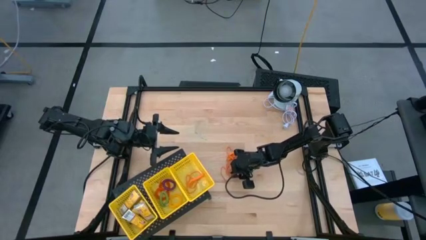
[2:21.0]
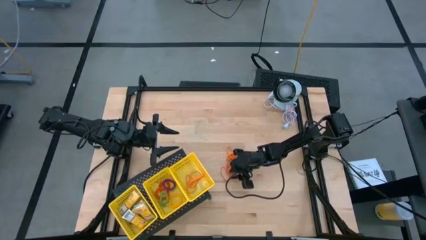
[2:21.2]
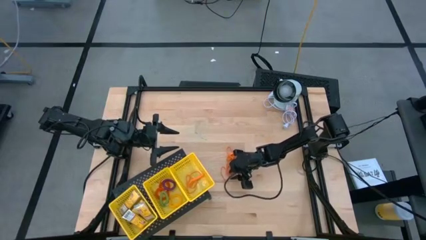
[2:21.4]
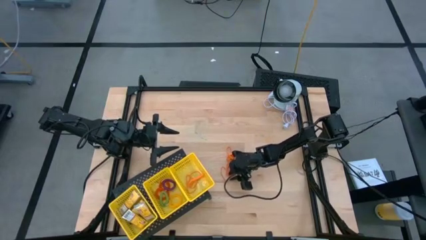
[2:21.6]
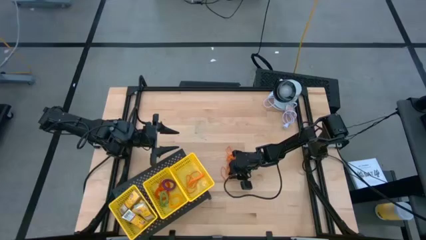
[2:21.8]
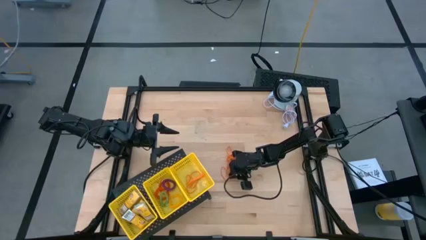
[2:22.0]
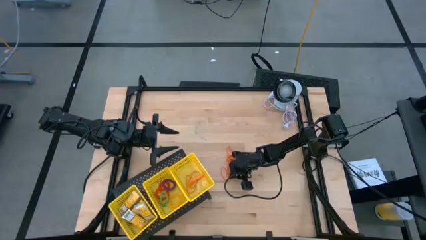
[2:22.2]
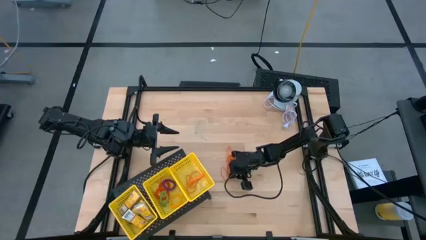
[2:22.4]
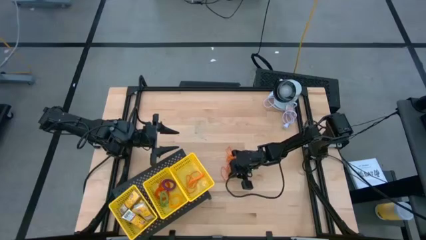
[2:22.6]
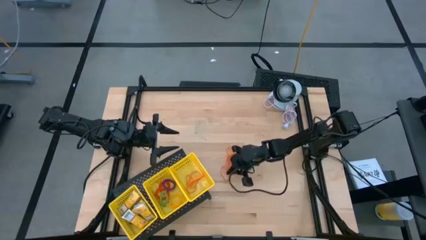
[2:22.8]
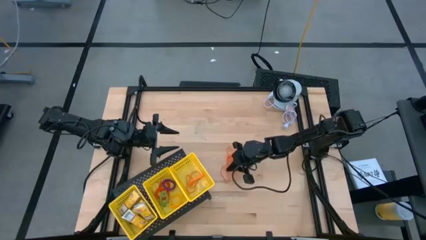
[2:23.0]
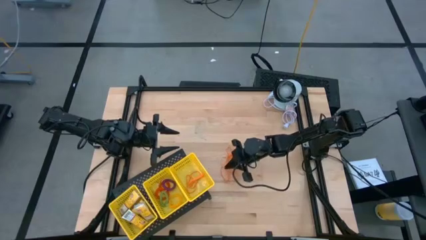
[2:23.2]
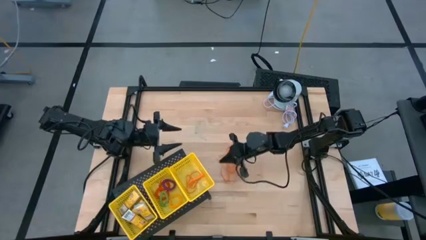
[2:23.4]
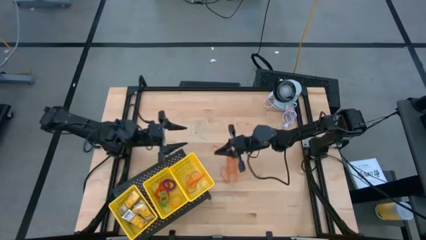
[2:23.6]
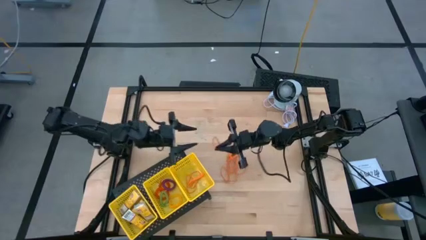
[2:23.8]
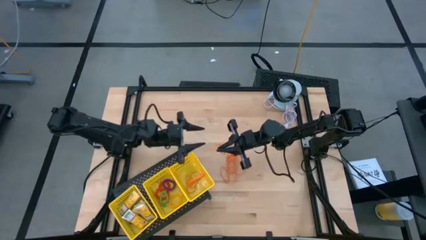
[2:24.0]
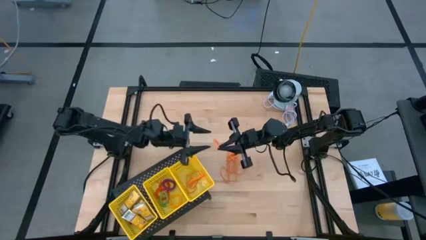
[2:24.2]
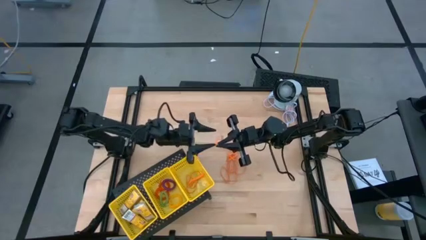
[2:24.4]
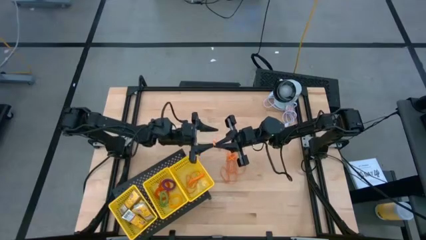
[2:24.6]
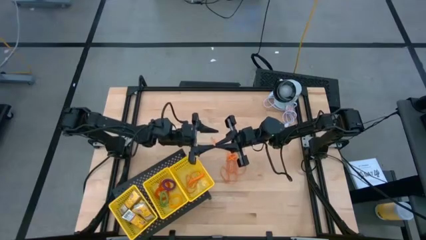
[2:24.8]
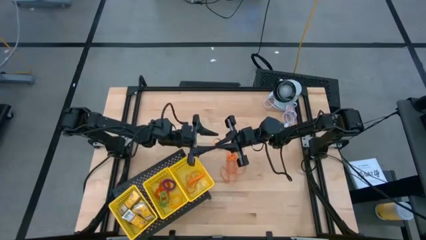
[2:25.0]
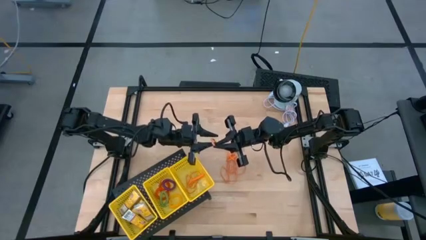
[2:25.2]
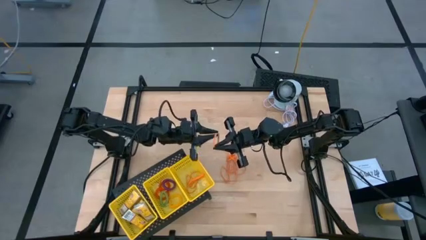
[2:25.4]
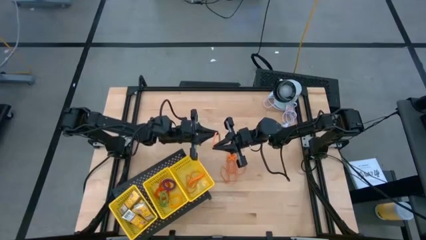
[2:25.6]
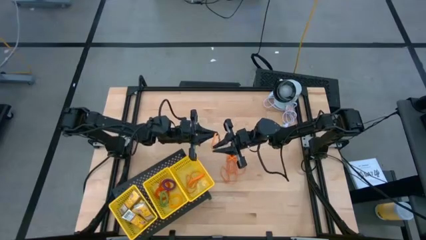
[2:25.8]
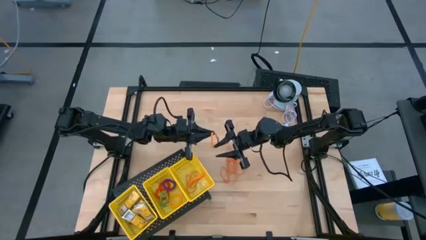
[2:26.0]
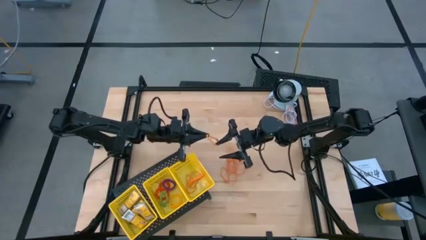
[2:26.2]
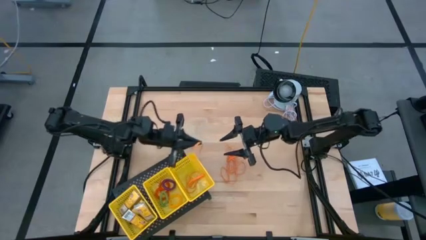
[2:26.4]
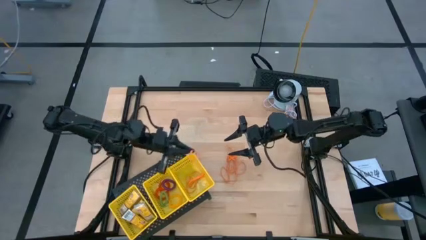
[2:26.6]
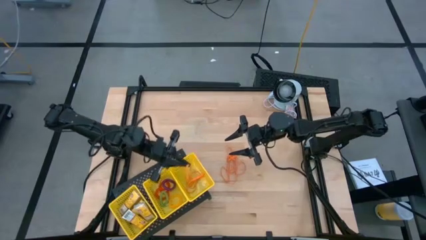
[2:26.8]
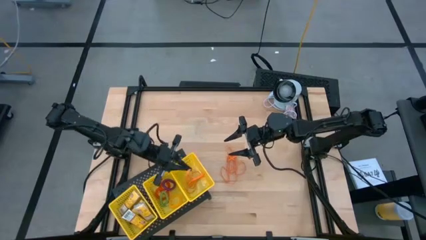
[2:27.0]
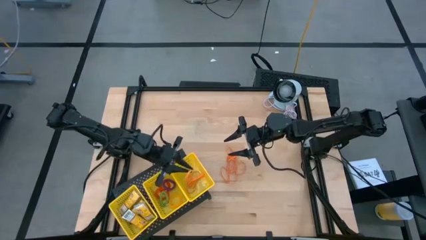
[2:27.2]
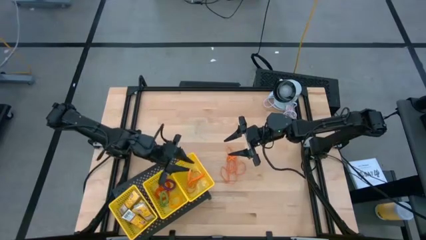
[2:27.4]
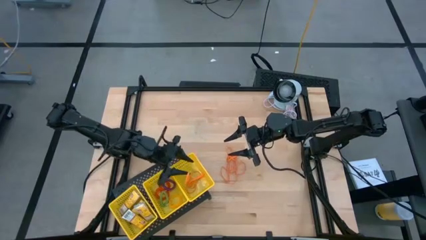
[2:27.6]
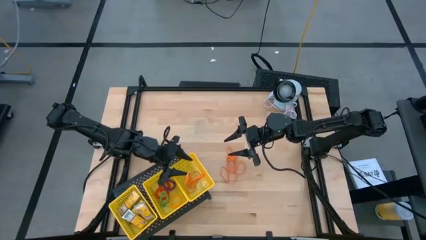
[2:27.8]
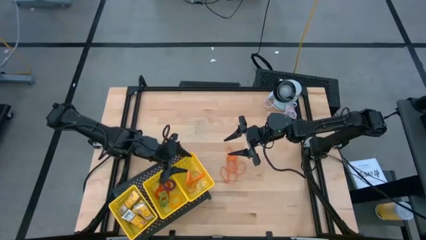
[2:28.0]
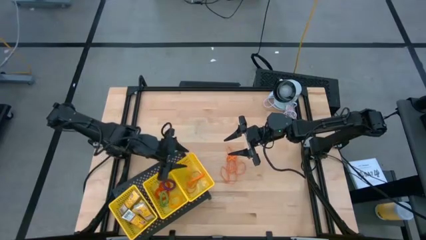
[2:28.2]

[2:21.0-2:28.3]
Task: Pick & Place Office Desk Supplies
Put the orange rubber band into the right yellow bin on the shelf

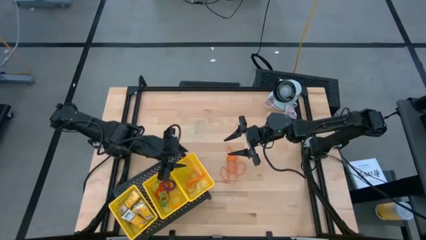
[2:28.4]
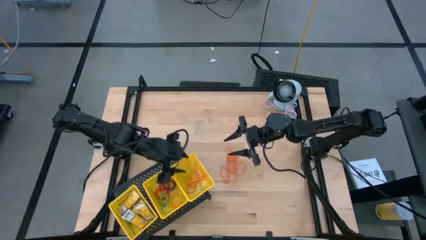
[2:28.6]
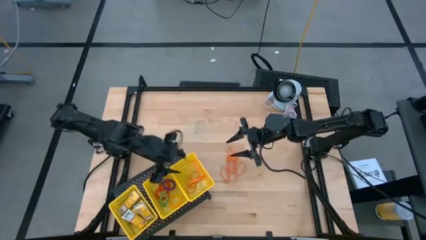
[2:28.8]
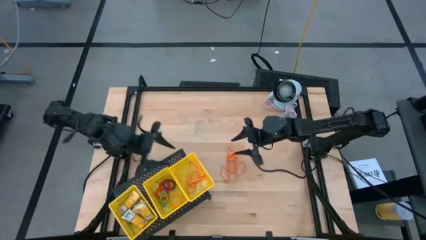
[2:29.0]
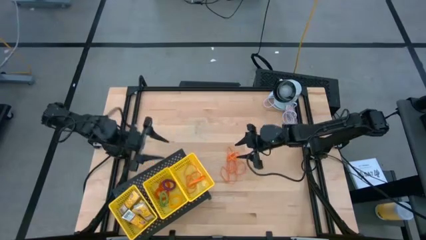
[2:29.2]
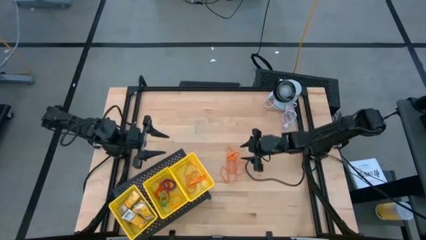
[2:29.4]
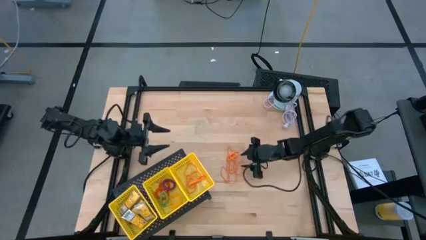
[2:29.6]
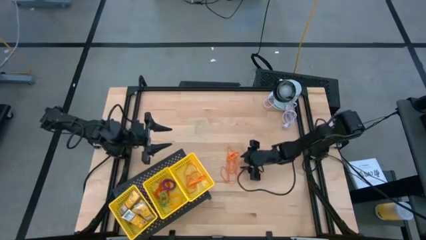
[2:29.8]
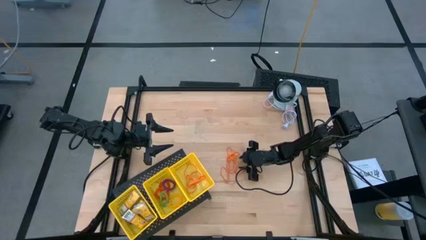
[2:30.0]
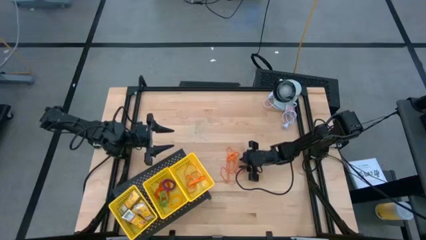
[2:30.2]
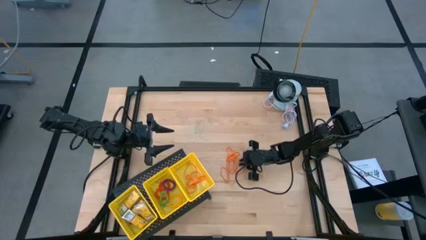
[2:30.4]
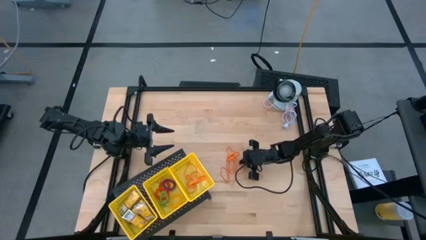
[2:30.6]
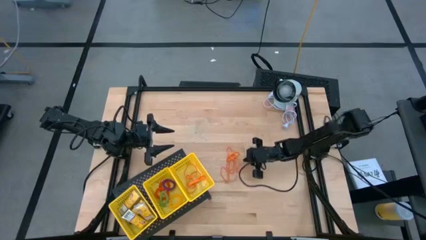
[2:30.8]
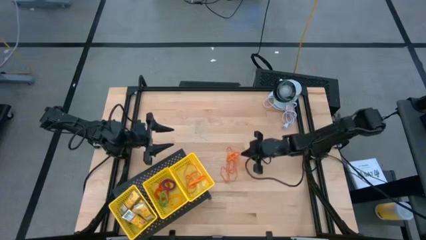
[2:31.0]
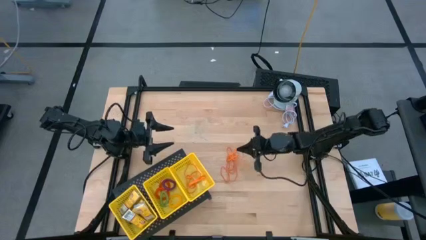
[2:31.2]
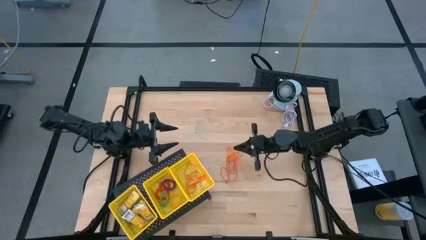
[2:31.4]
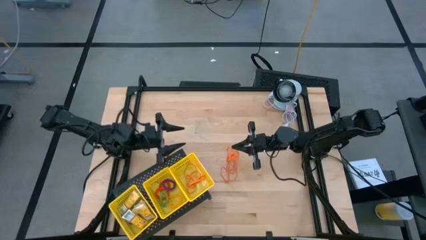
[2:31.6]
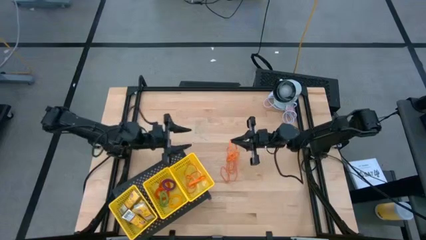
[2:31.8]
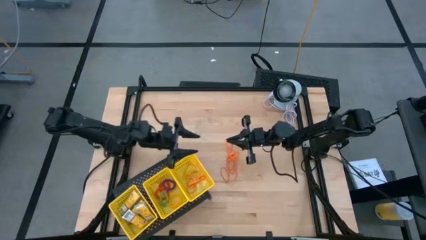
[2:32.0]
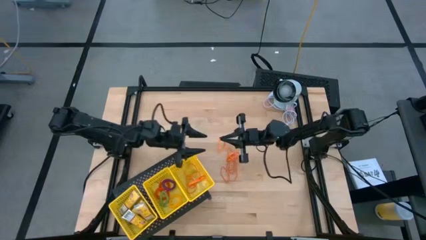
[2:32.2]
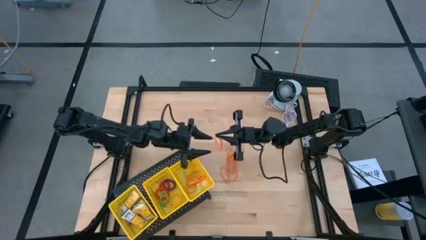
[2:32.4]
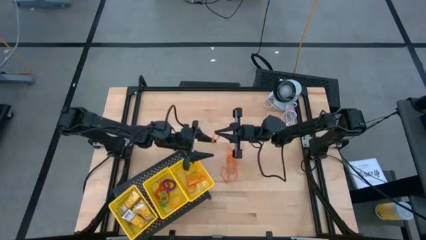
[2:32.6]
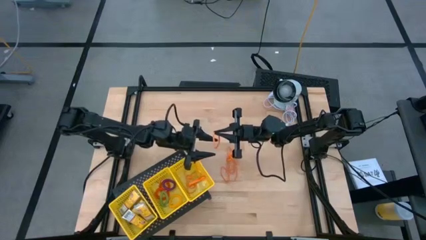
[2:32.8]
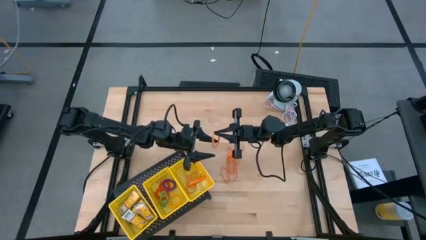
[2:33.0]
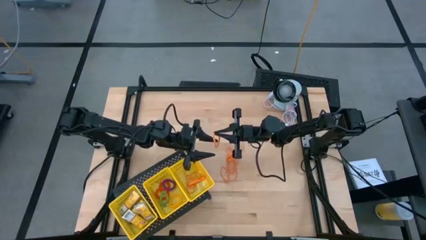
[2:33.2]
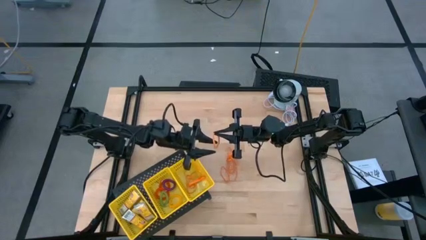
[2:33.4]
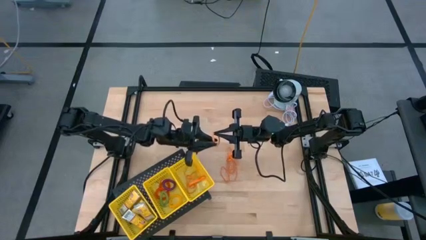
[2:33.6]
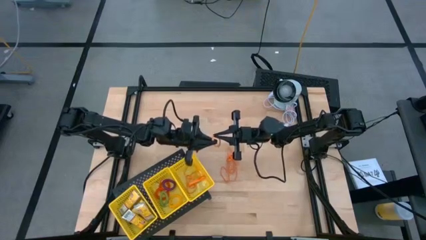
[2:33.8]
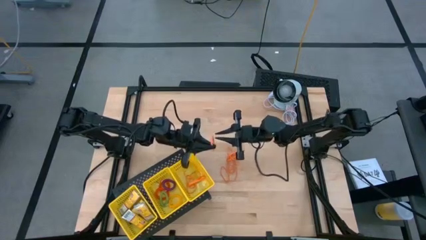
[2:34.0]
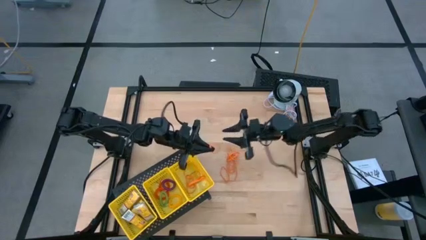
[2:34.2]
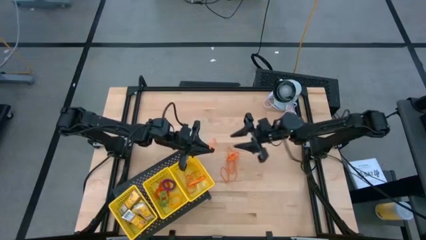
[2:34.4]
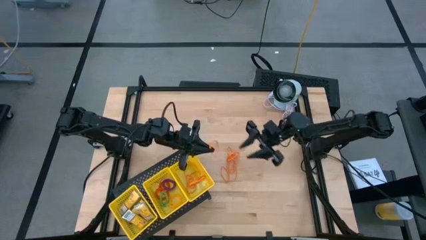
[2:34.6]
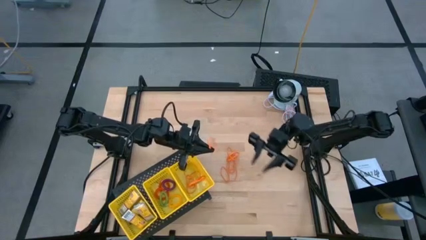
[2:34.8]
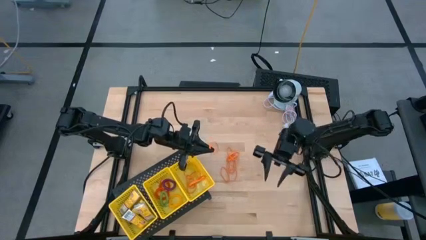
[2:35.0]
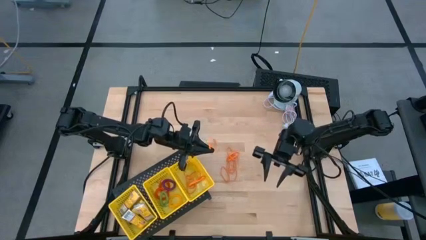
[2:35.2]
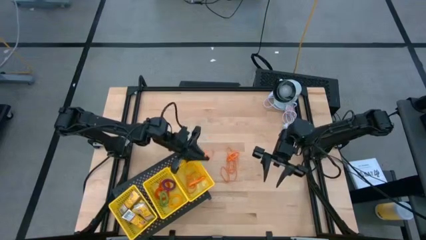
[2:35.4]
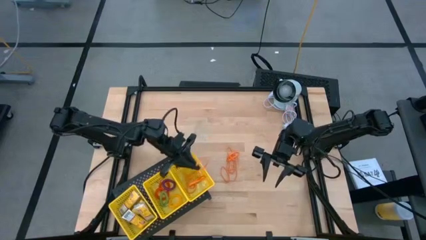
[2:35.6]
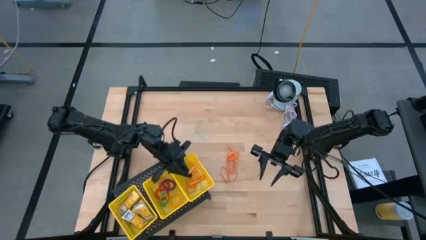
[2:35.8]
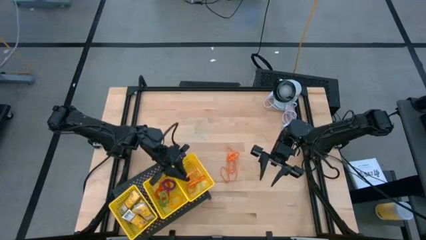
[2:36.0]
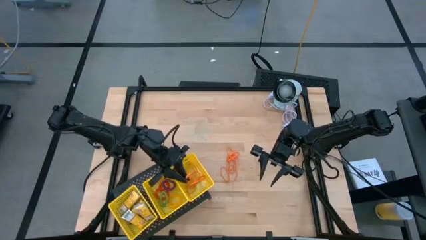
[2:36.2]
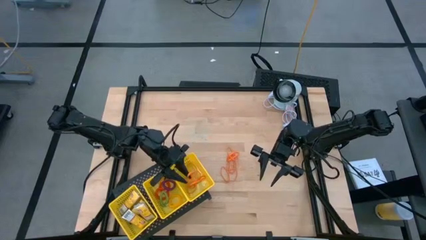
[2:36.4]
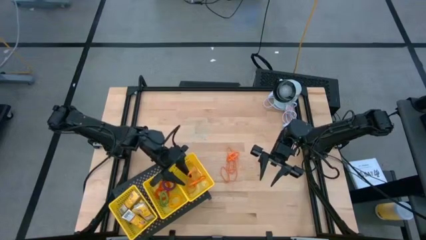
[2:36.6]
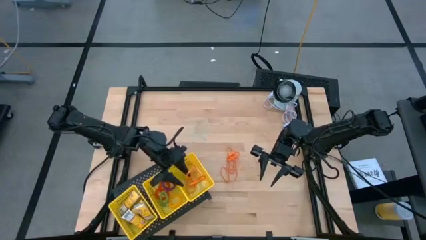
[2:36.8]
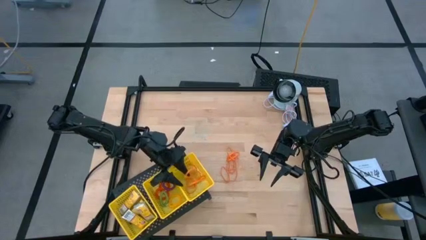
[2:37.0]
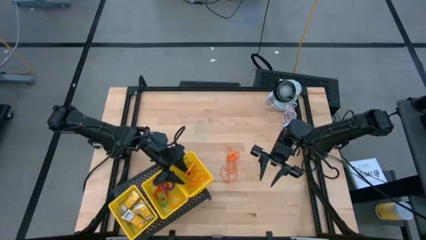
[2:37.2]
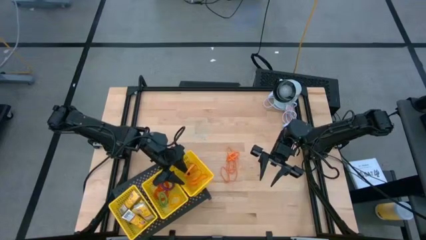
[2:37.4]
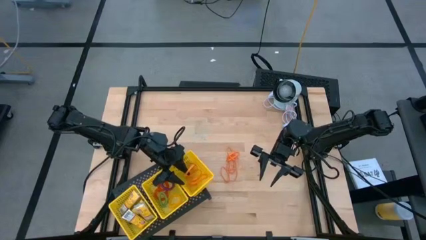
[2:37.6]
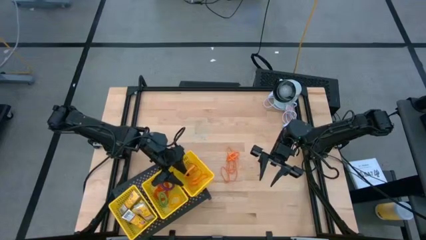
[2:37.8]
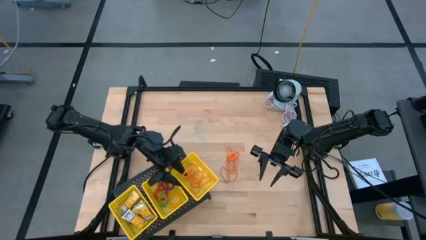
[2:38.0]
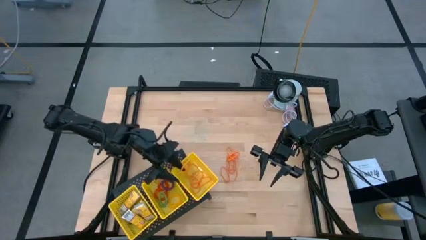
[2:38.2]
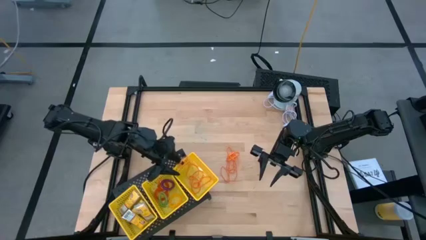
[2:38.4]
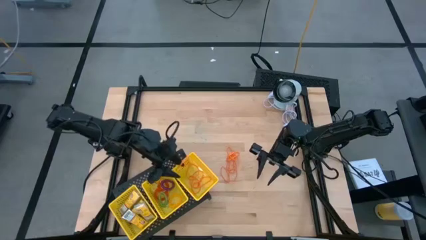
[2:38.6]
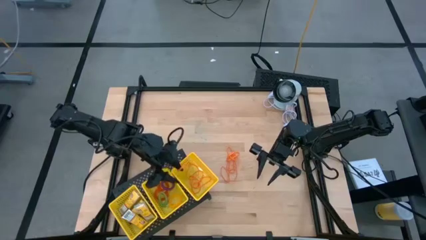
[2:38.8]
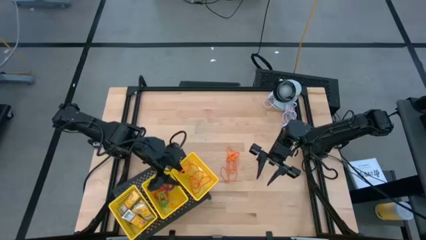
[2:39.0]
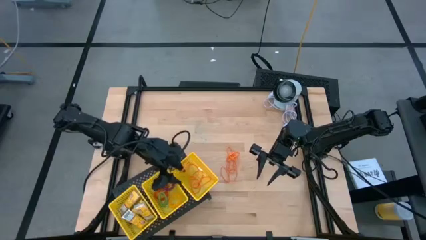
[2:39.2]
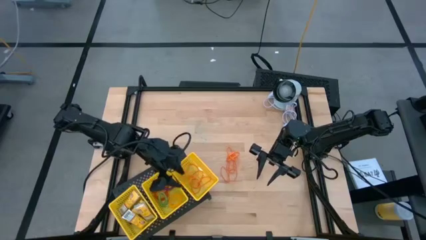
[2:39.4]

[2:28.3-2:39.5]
Put the orange rubber band into the right yellow bin on the shelf
